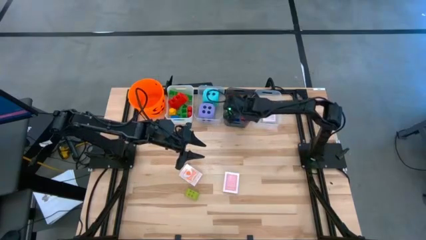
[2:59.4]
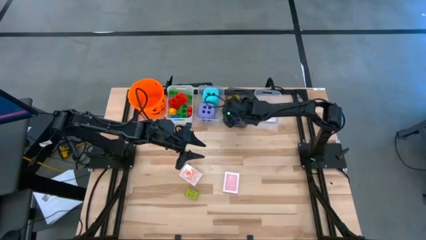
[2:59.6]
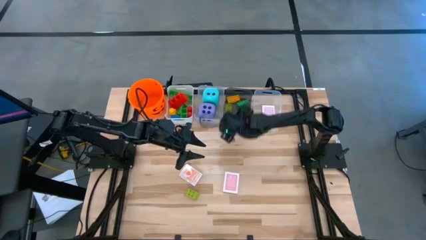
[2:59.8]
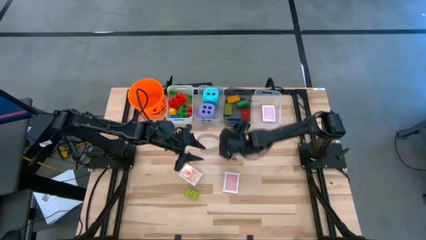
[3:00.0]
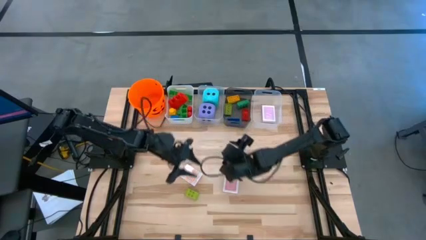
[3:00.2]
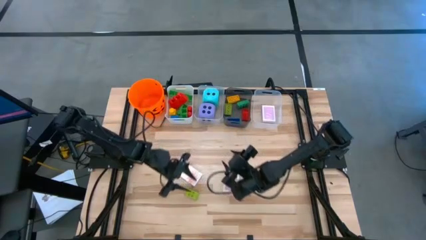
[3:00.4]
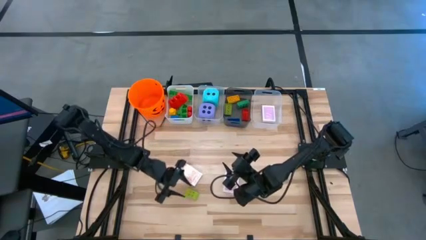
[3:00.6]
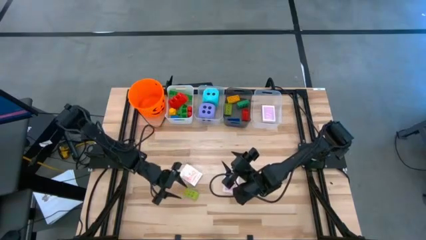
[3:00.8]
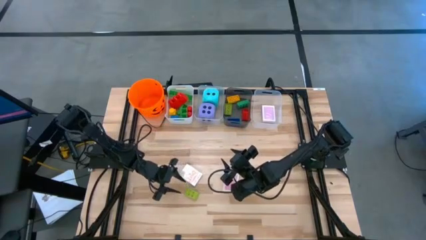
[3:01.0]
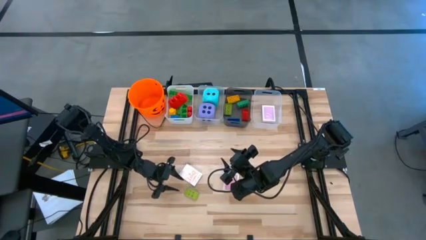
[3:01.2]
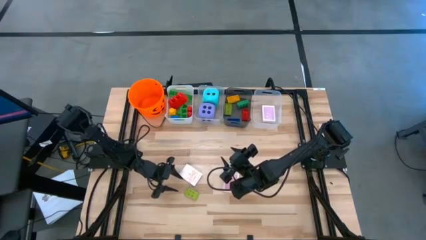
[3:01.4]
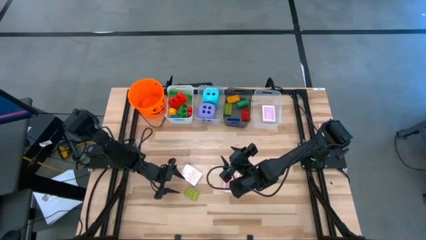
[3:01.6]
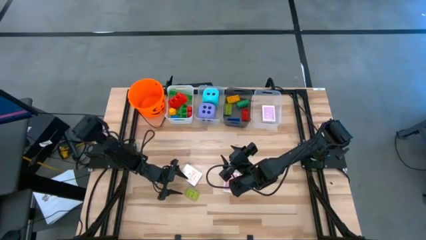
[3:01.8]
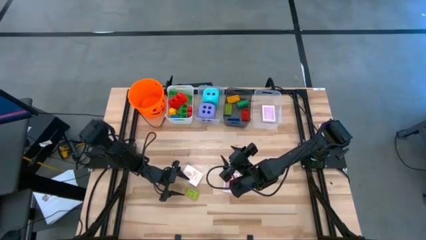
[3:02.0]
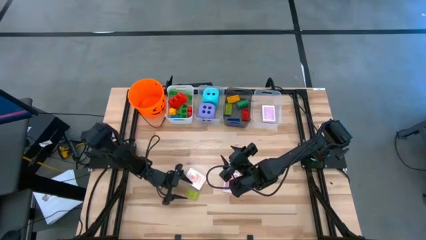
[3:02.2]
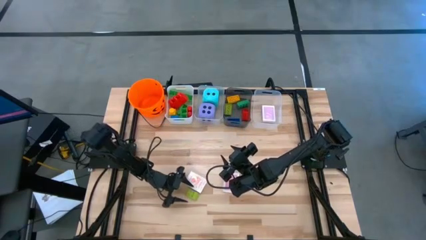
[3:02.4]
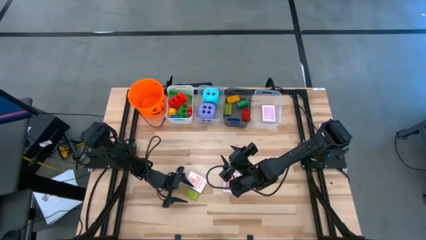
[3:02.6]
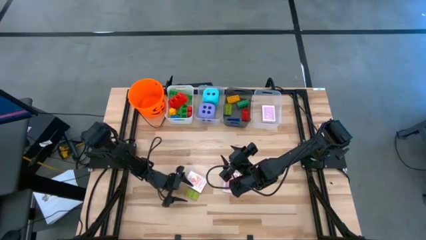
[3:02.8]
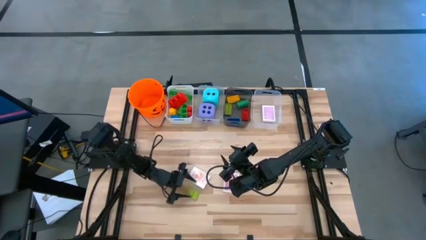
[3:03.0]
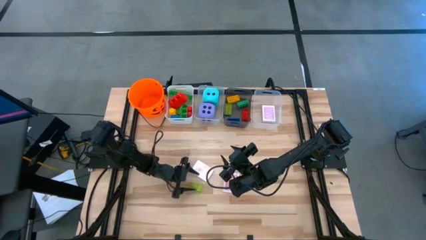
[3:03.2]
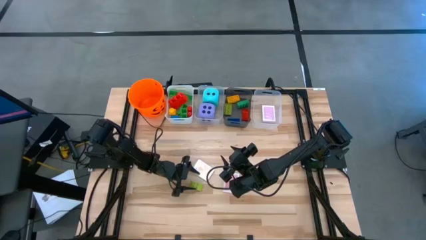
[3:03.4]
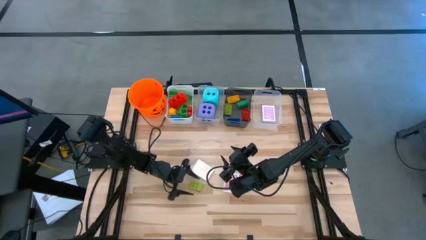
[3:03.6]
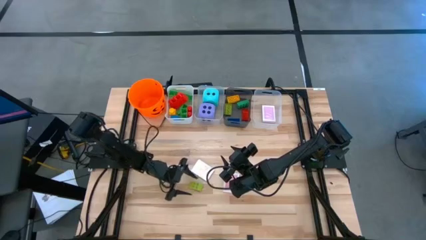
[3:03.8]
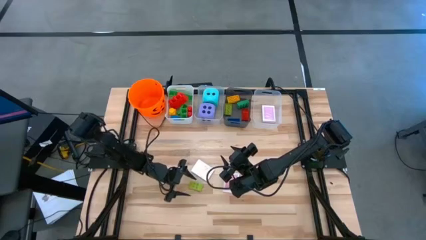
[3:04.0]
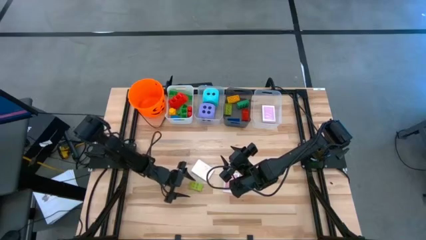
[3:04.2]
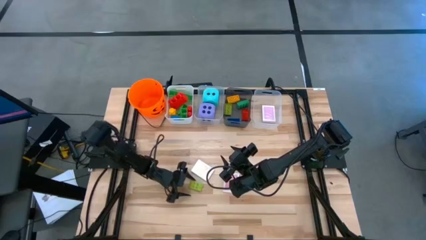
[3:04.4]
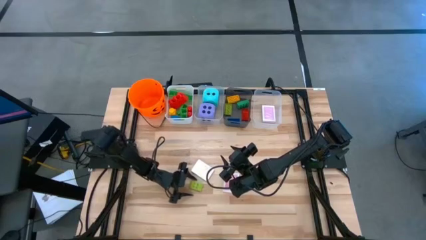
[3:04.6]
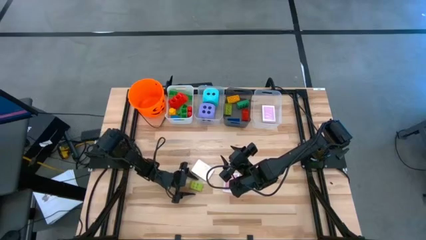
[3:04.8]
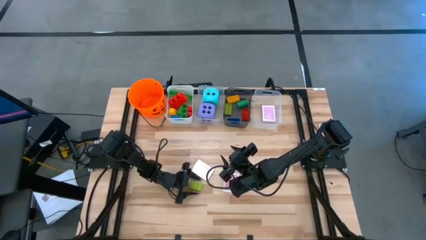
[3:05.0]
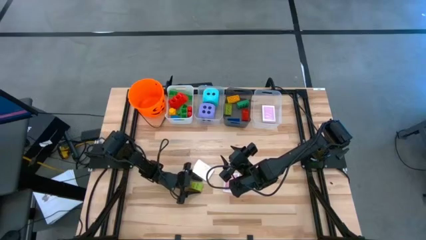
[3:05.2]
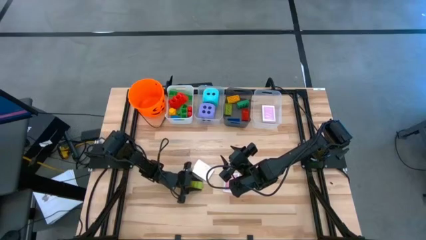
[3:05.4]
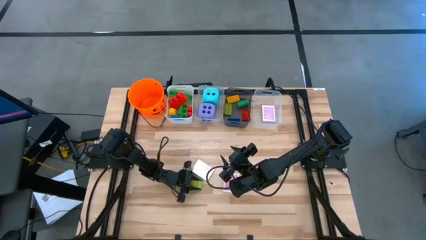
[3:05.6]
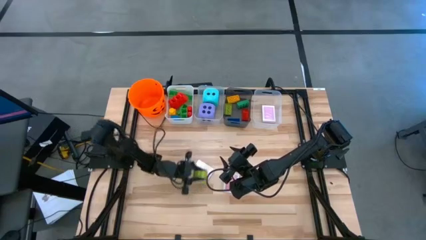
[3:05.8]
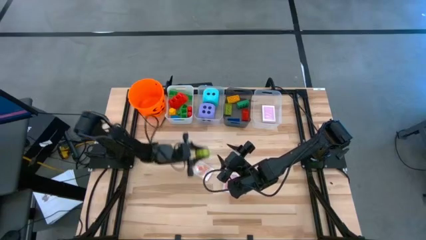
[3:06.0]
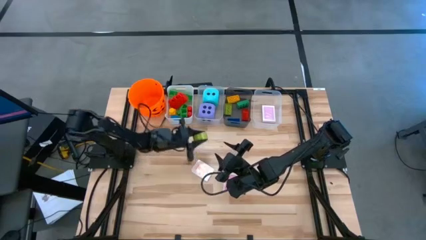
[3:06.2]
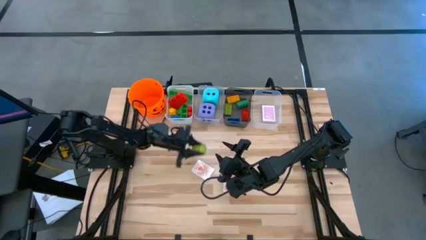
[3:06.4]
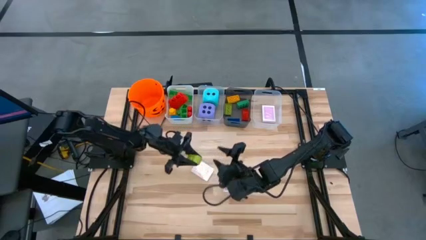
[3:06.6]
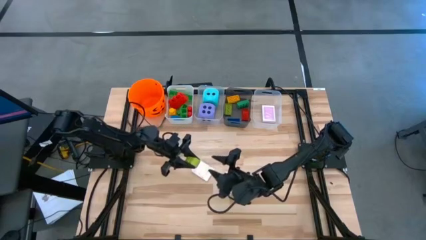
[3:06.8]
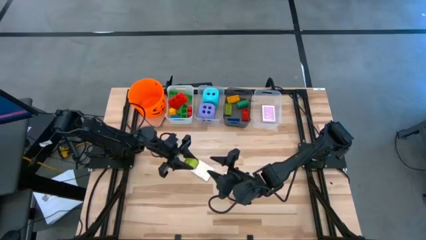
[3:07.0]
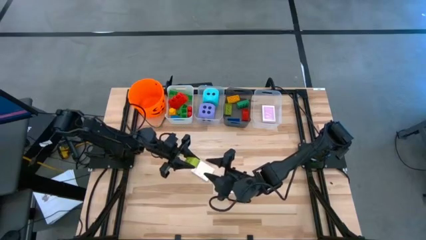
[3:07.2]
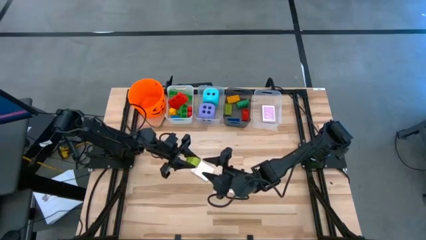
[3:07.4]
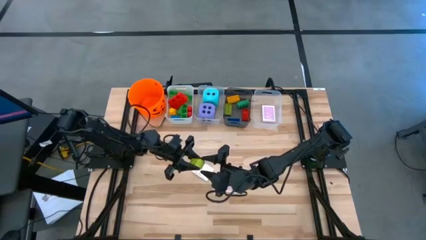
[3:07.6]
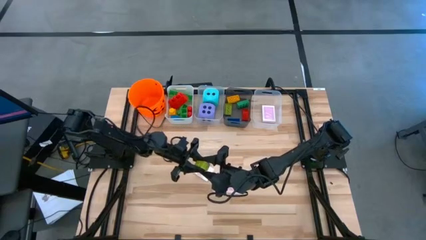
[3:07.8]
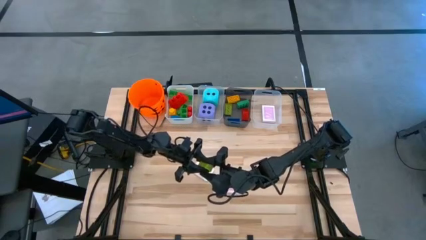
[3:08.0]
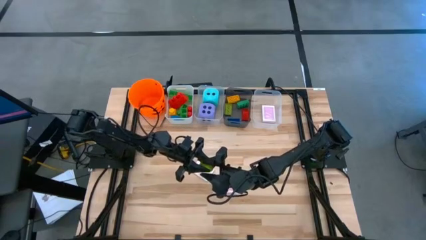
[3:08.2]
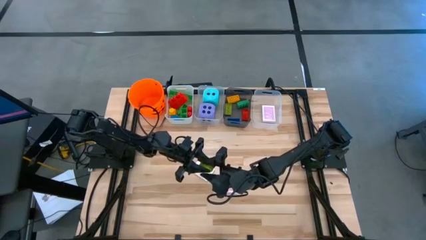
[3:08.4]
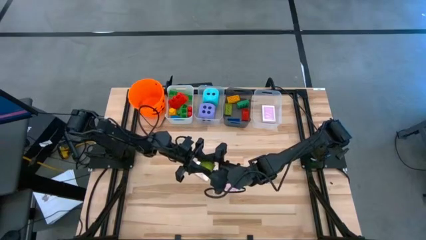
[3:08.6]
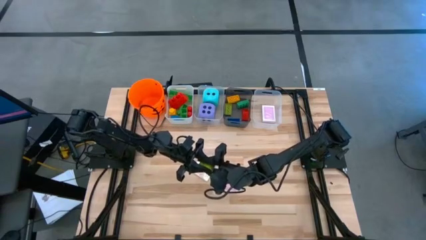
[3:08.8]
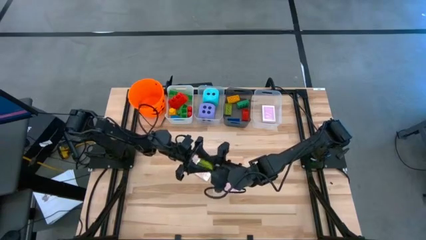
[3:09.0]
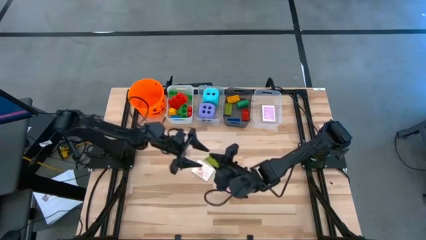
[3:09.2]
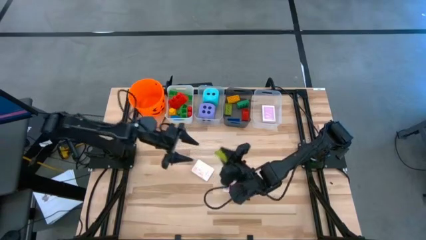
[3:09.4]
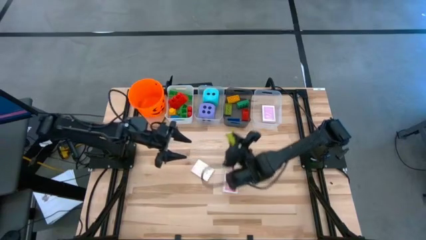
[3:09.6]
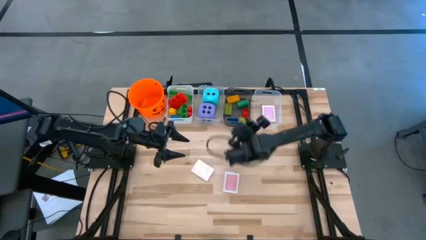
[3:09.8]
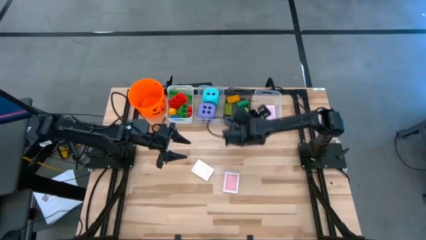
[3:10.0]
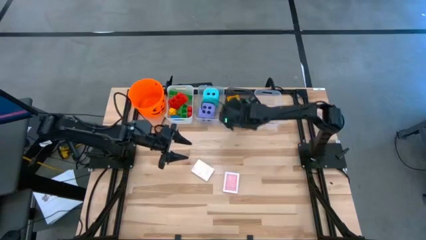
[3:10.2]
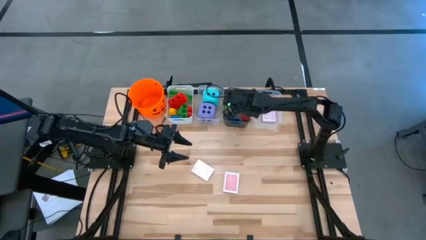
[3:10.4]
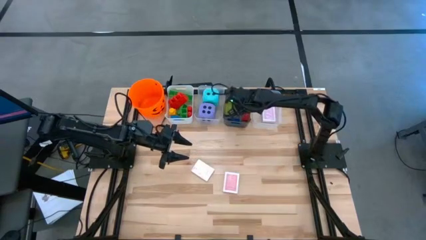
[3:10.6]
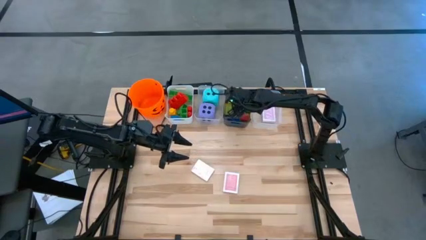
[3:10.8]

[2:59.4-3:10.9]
Task: Pick & Place Toys
Put the light green game piece into the black bin

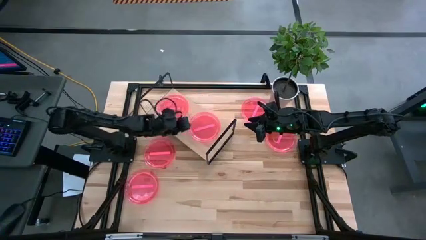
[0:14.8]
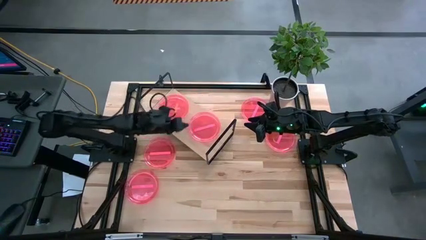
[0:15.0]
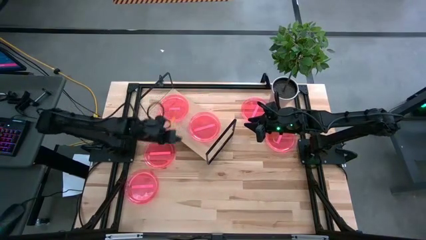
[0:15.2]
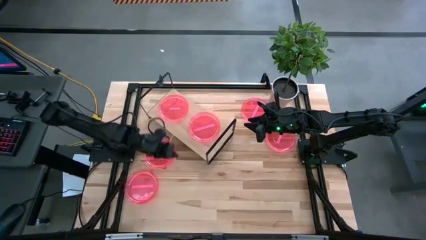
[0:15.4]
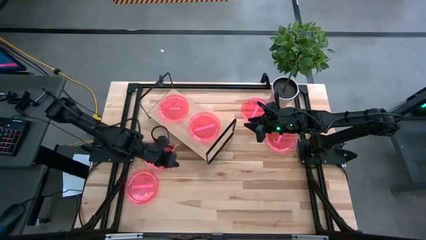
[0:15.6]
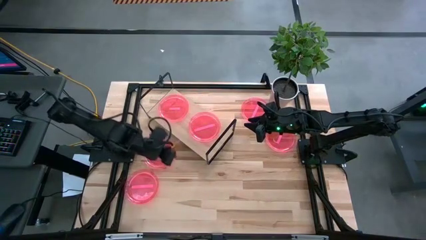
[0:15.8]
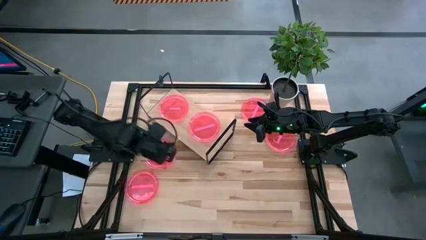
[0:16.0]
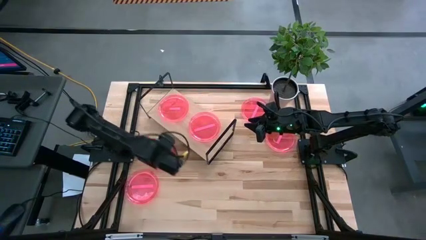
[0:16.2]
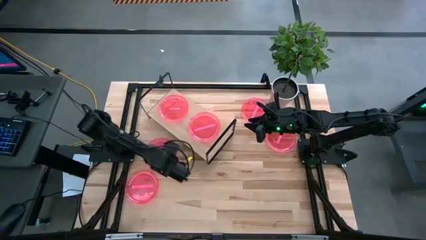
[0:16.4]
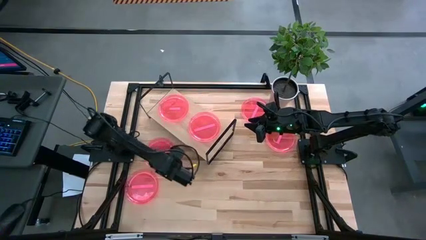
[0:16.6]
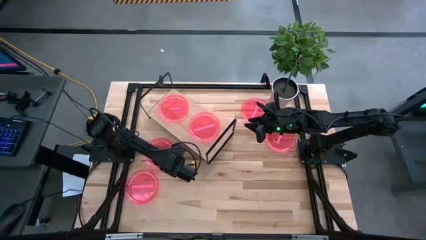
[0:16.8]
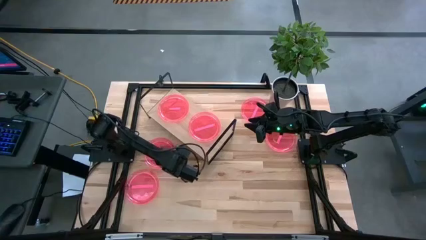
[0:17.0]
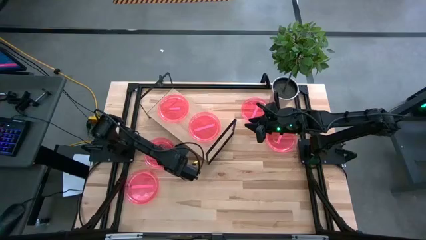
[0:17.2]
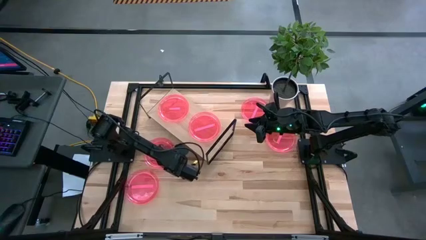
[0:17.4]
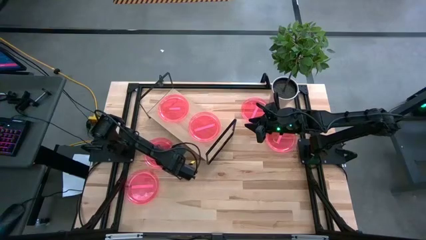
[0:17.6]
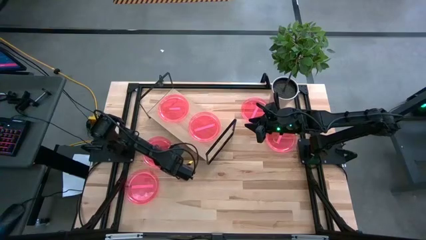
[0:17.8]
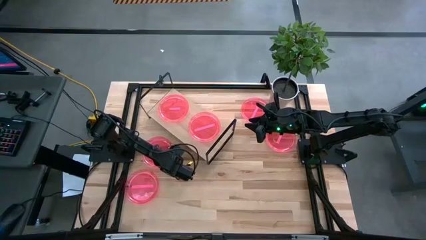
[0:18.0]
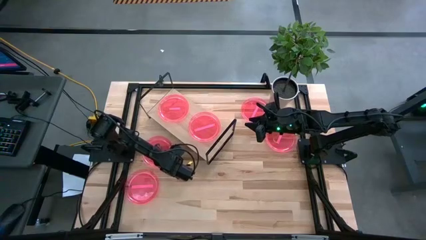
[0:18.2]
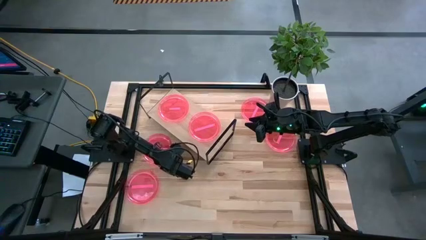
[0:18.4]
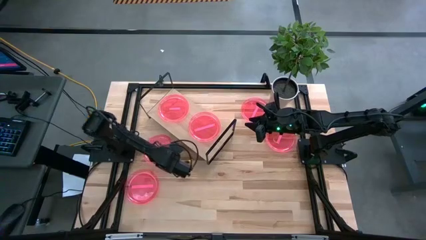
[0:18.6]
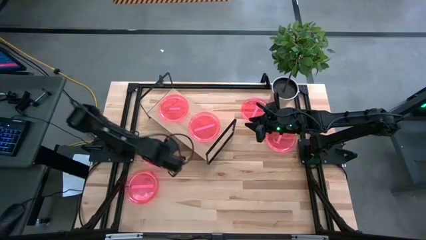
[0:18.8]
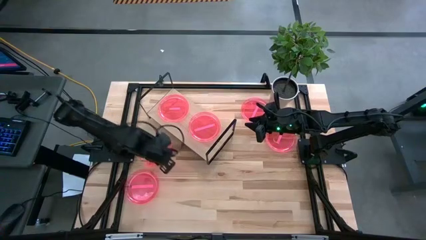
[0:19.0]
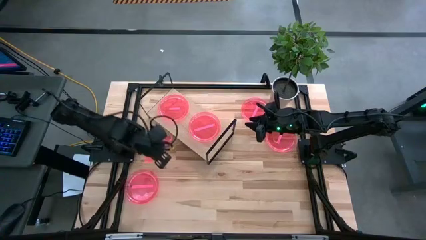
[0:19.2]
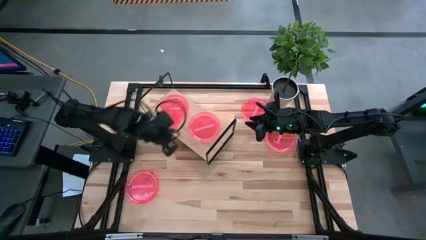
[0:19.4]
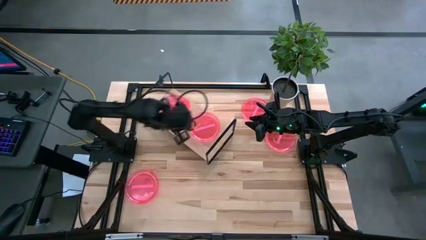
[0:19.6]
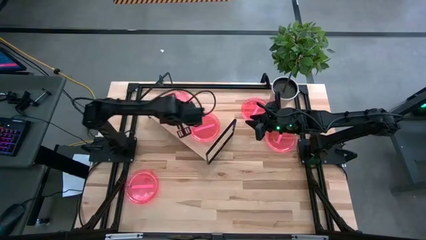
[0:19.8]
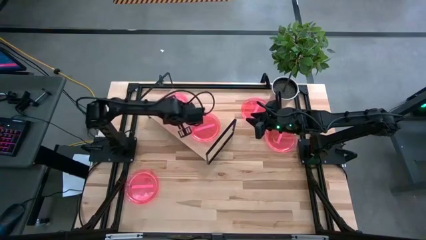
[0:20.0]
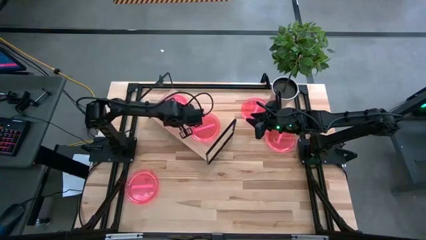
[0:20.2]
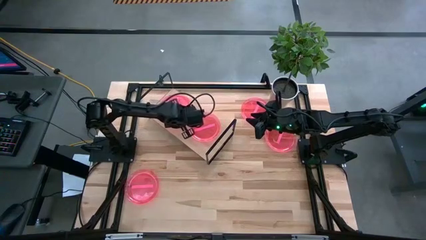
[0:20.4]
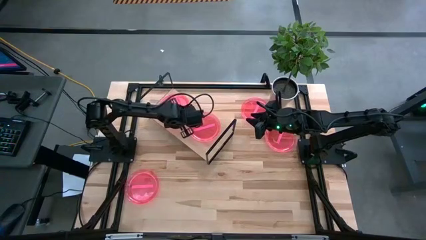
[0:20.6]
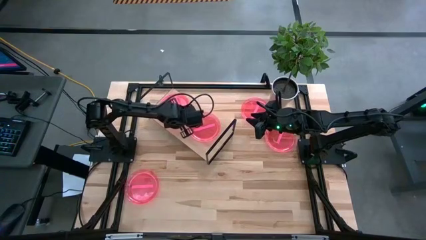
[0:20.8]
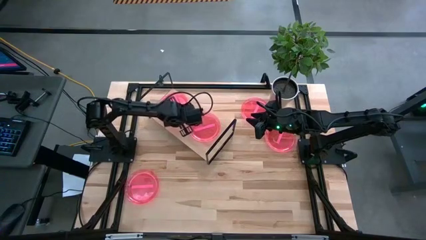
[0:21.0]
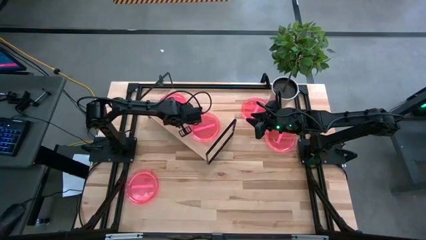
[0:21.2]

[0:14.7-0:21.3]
Task: Place and stack plates onto a shelf
Stack the pink plate on top of the left pink plate on the shelf
